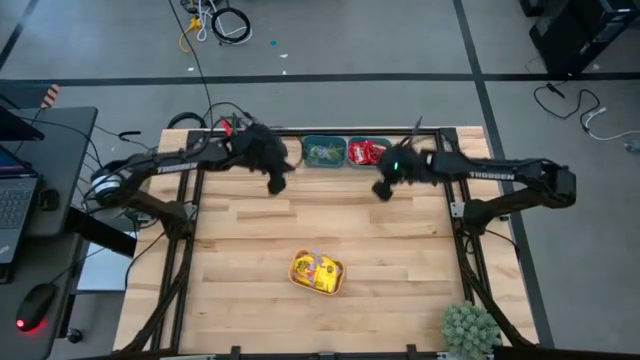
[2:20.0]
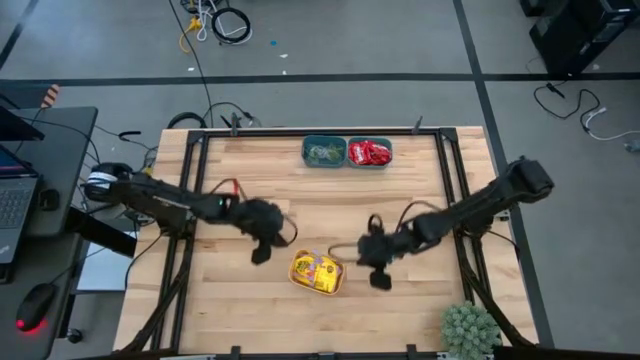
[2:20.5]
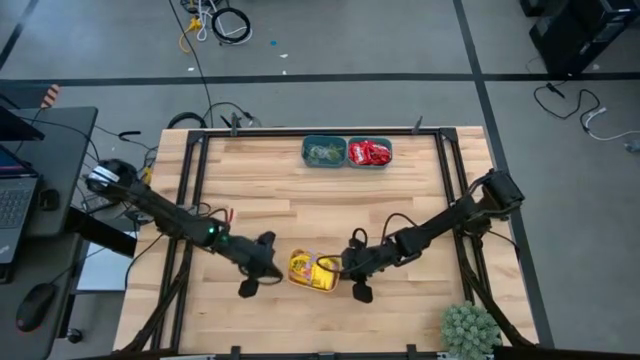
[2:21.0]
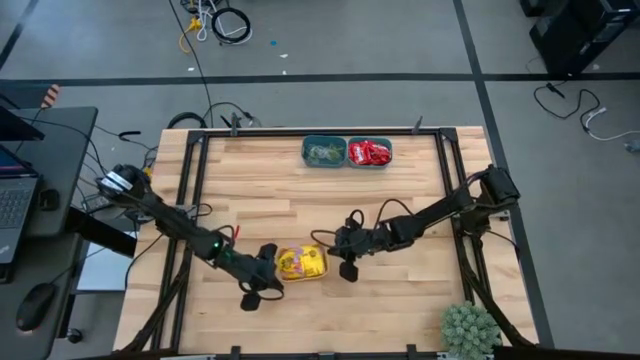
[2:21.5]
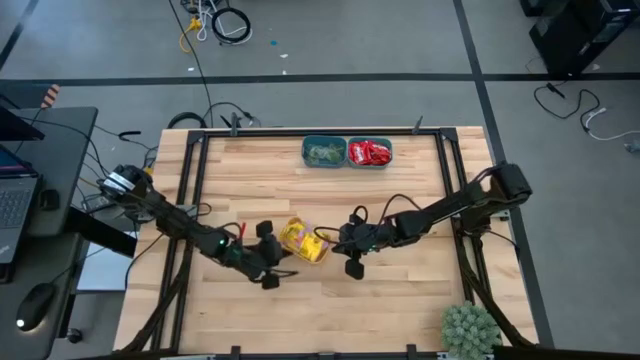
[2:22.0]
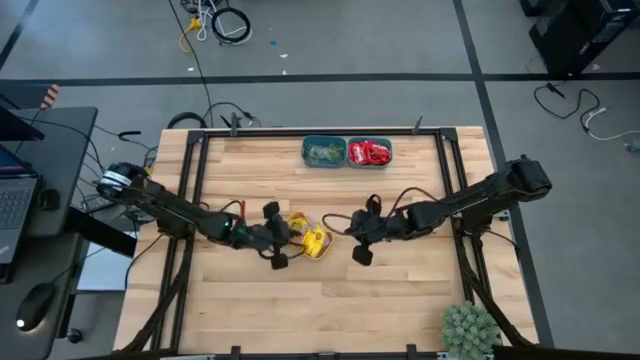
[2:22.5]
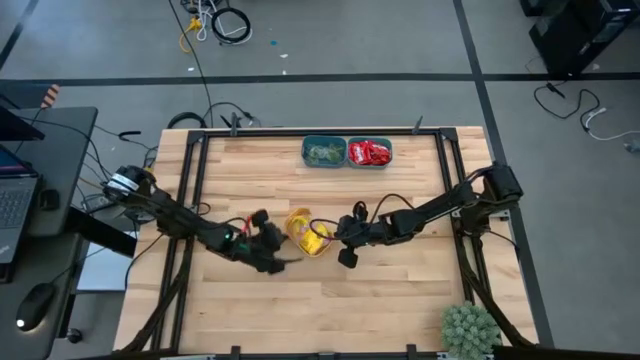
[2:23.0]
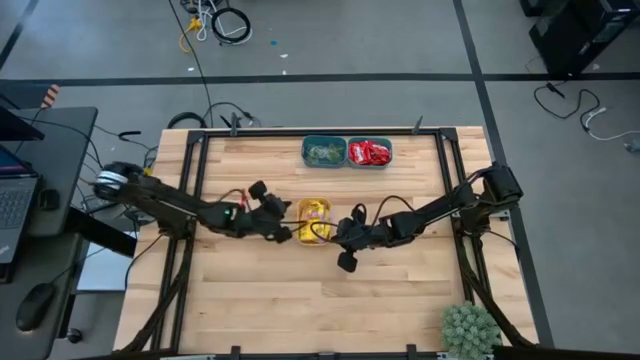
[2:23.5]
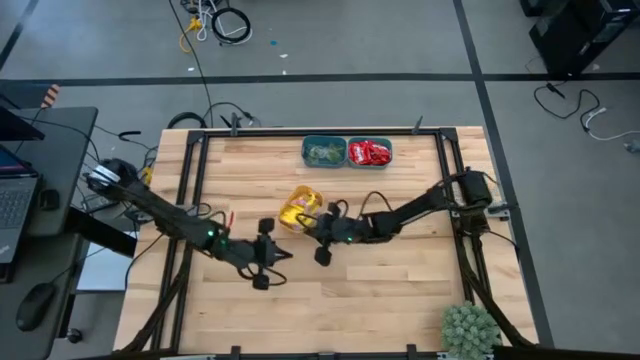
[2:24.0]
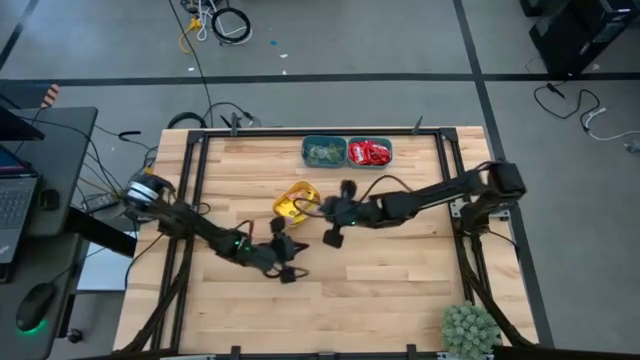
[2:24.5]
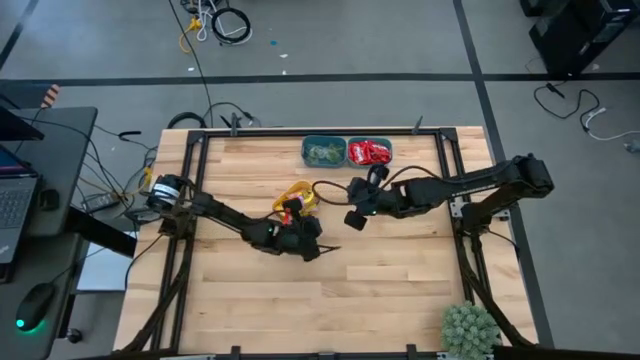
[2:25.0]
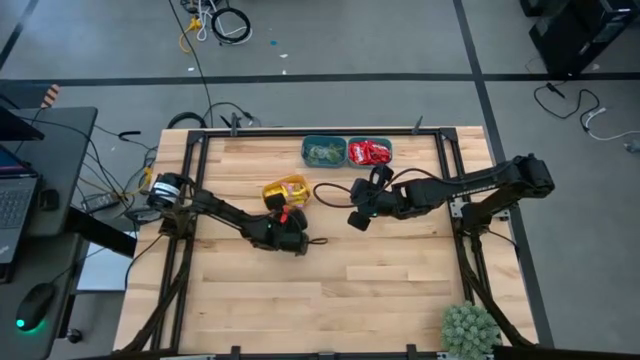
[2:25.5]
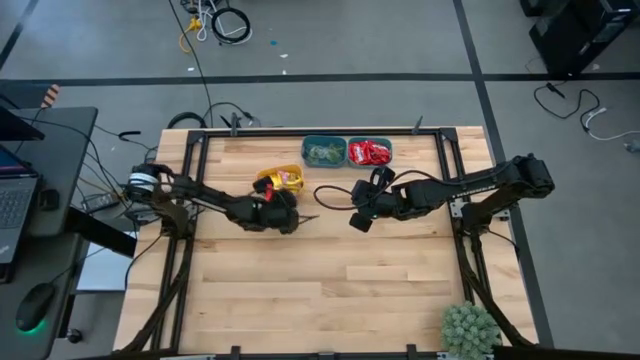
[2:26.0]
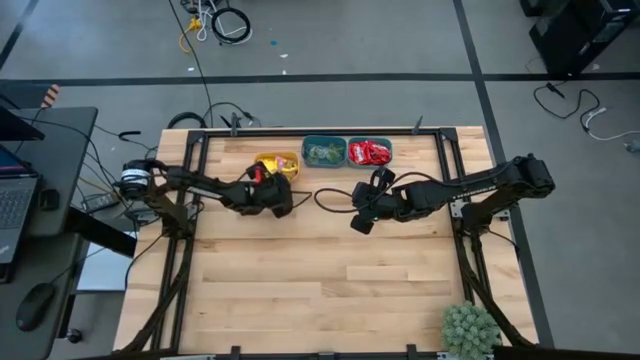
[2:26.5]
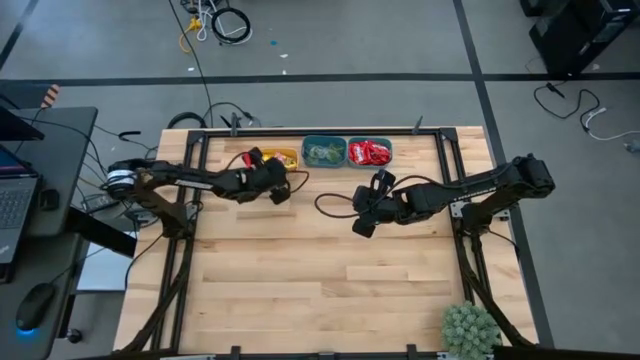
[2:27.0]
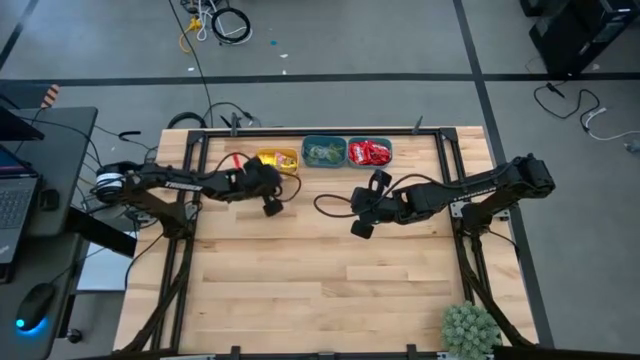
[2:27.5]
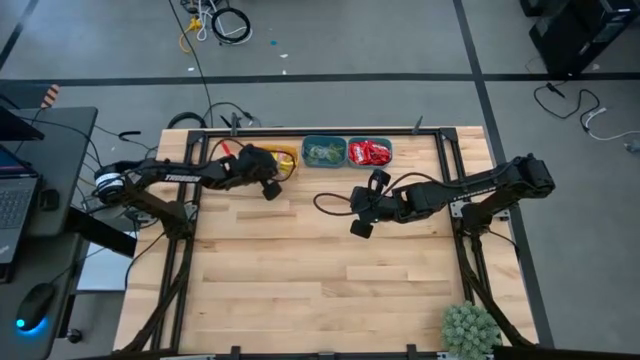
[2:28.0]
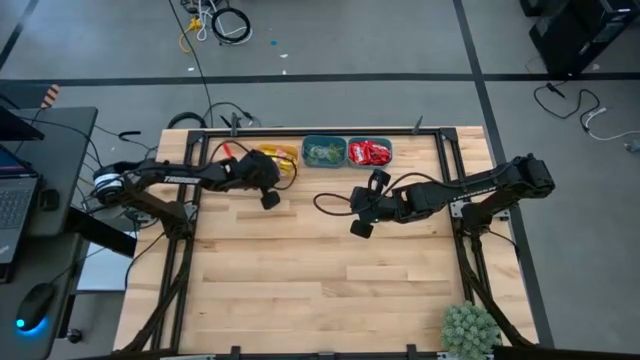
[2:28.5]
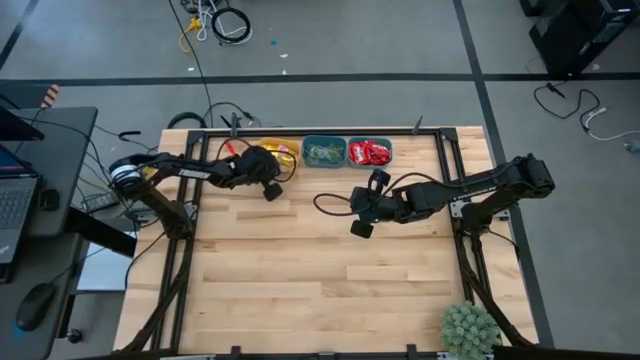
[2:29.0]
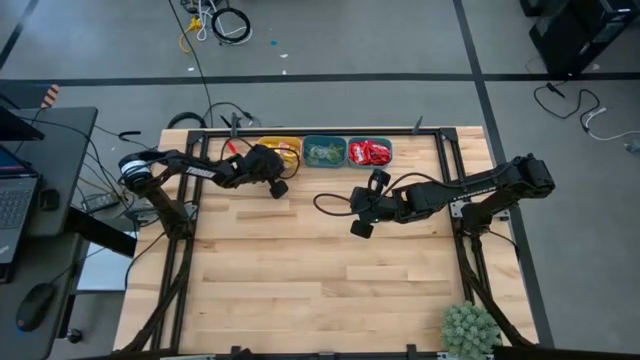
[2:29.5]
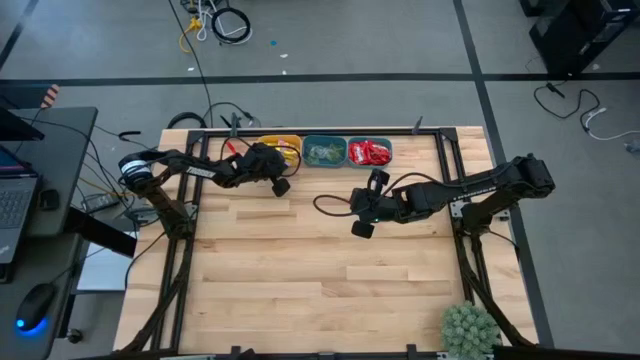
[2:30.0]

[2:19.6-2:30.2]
Task: Sort candy
Move the yellow bin to the left of the blue bin

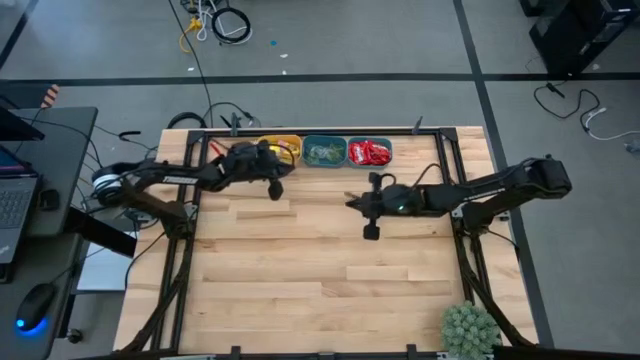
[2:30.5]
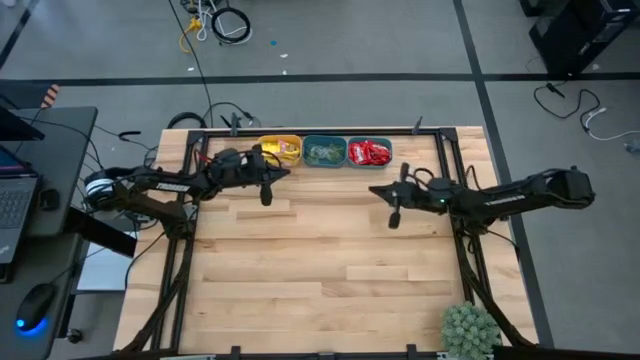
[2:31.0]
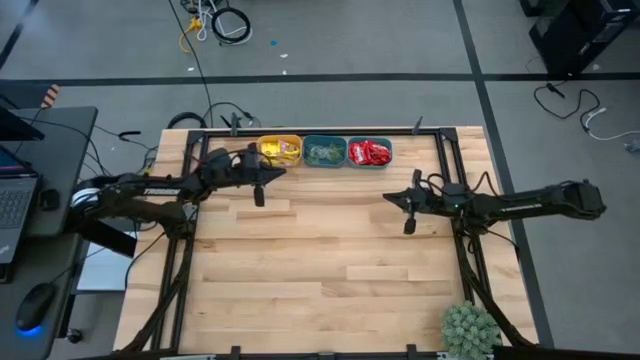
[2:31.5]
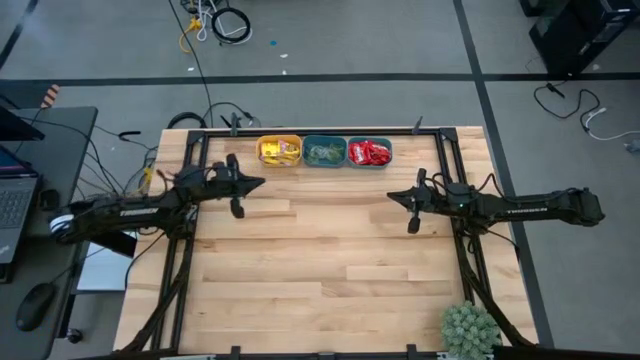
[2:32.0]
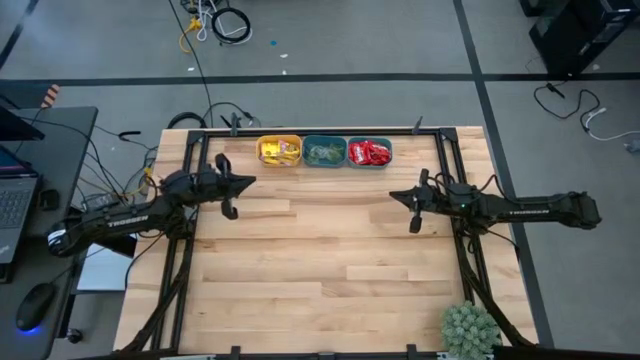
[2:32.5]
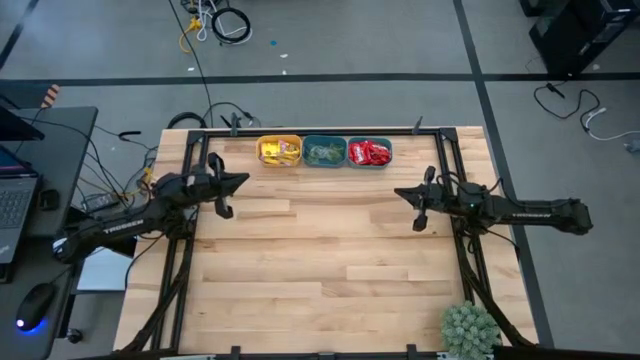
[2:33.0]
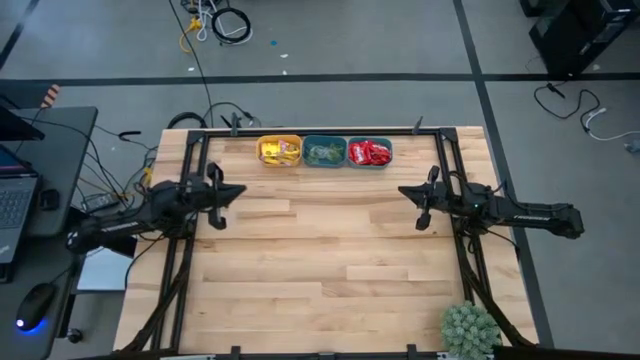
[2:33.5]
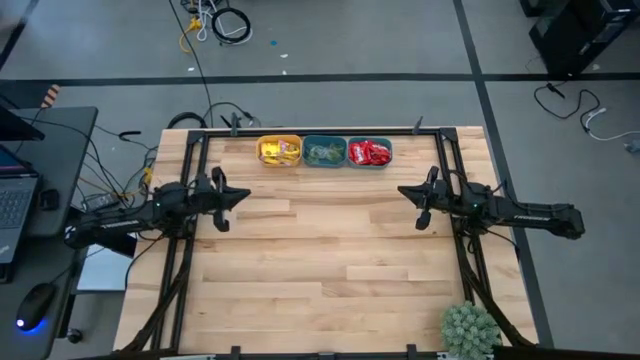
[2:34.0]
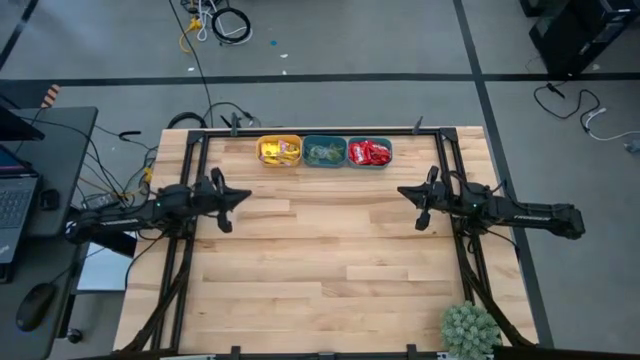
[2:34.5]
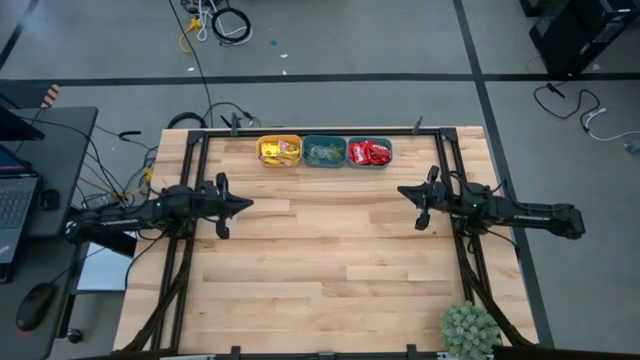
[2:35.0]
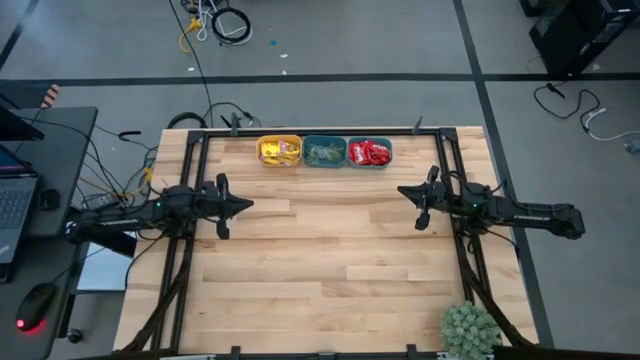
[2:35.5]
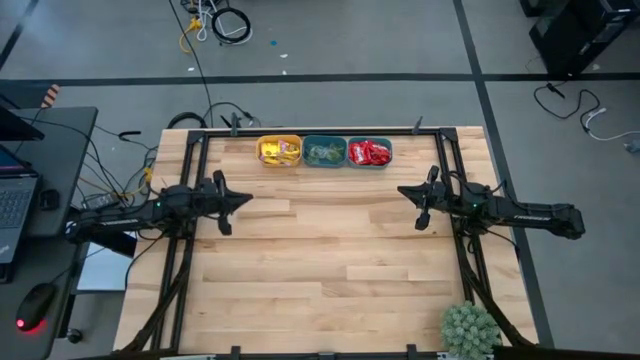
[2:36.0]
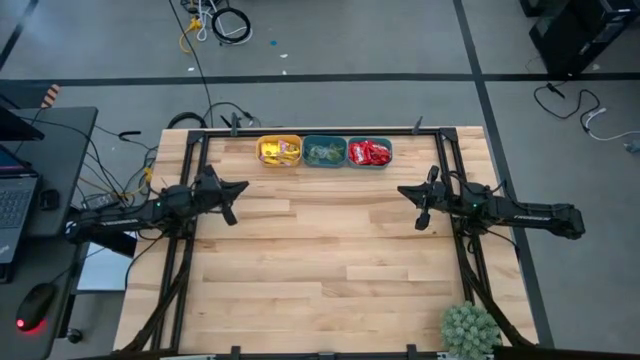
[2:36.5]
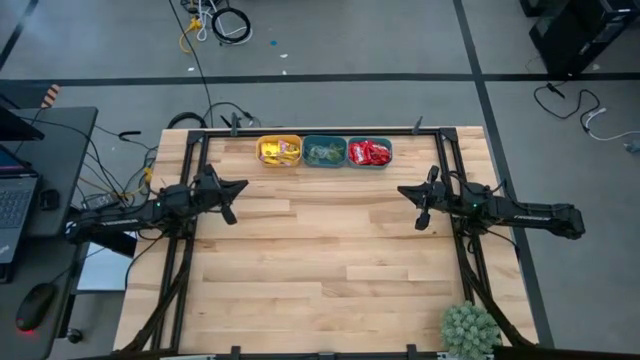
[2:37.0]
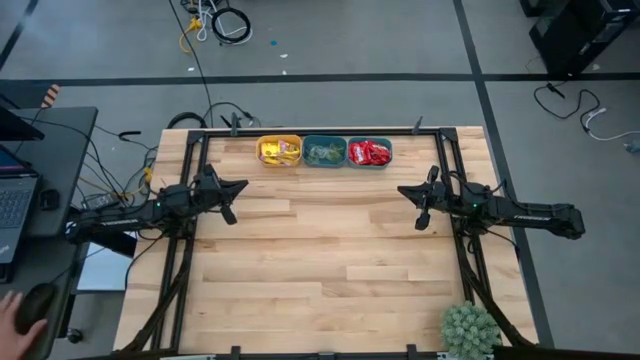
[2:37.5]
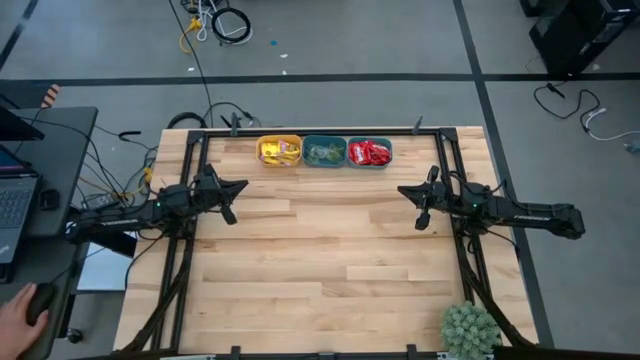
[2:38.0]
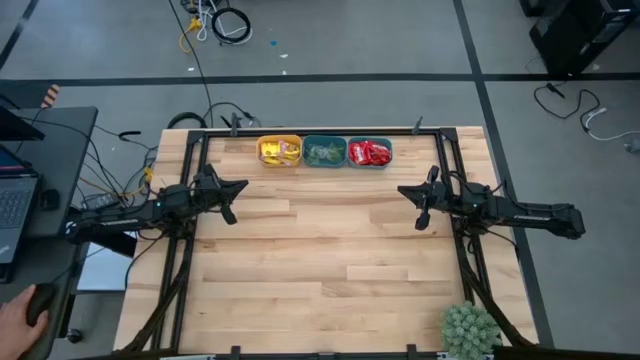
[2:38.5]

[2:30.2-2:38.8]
Return to Home Position

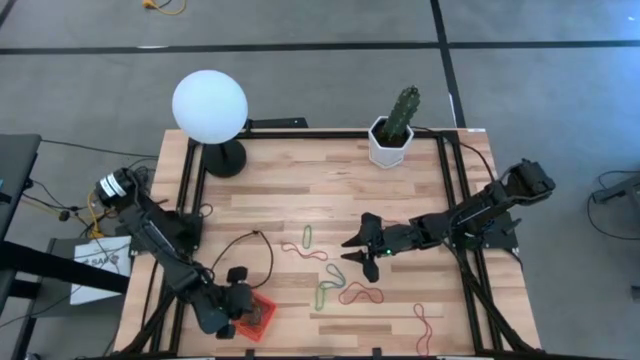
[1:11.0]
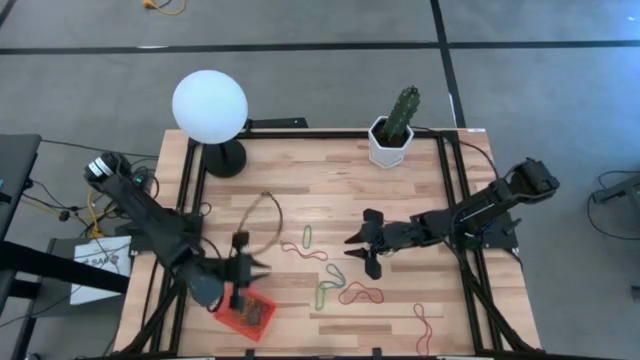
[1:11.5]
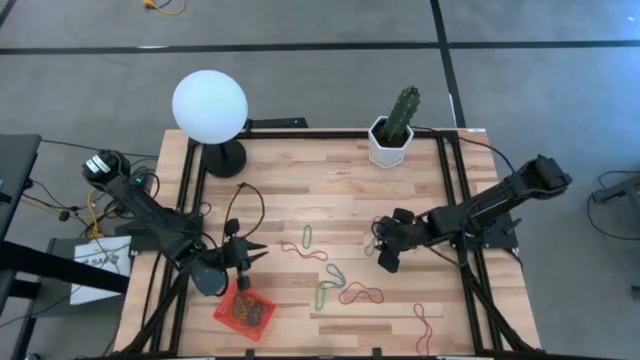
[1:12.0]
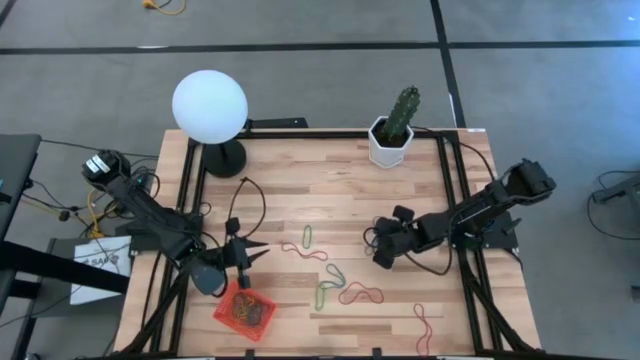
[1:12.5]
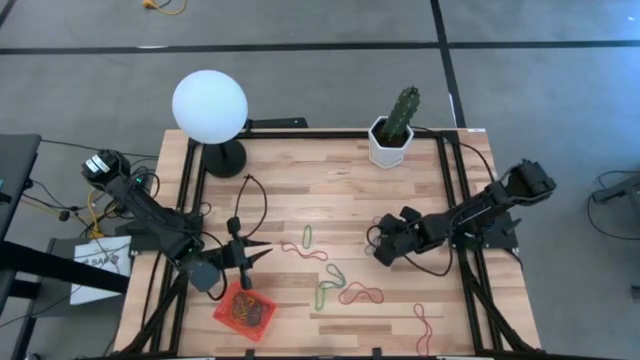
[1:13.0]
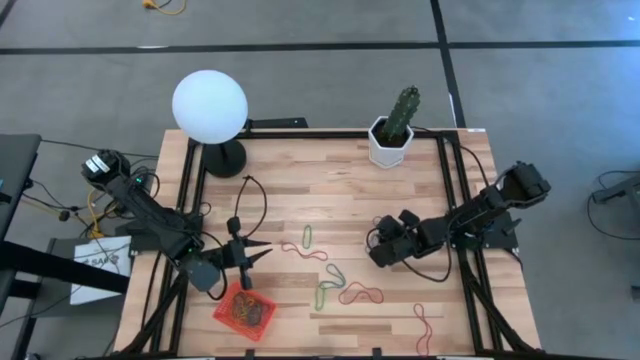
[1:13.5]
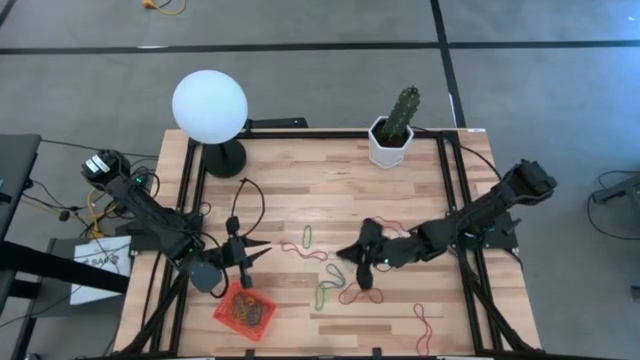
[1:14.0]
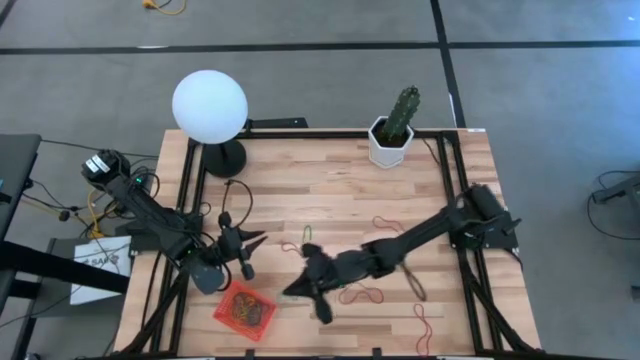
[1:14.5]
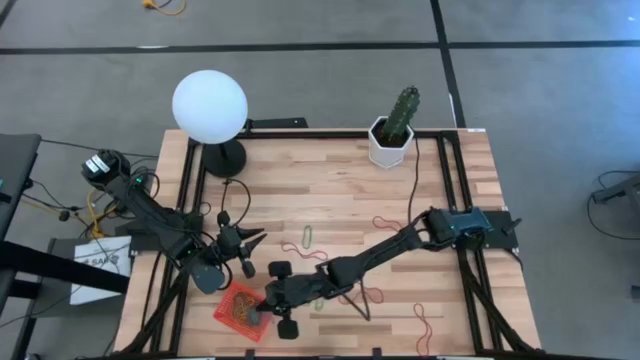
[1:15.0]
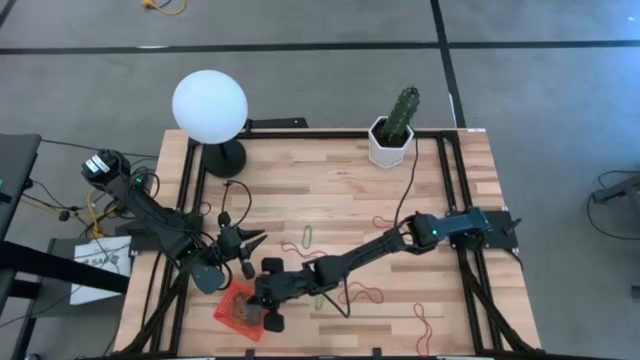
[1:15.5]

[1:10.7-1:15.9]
Task: Pick and place rubber bands into bin
Put the right blue rubber band into the basket
